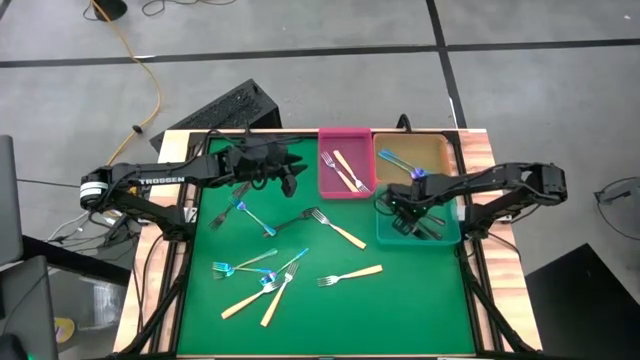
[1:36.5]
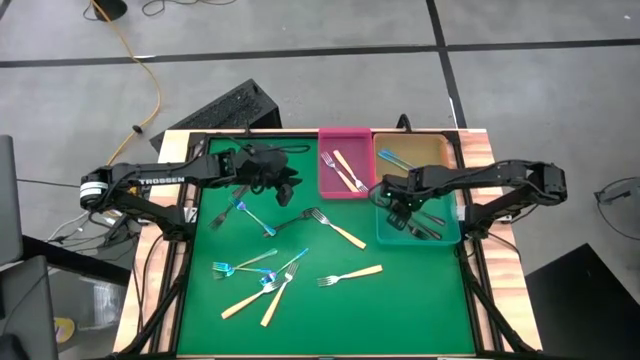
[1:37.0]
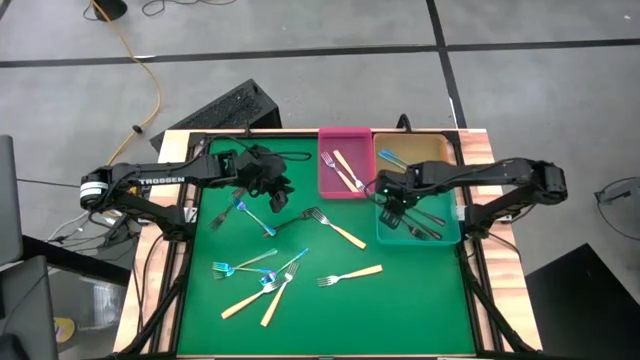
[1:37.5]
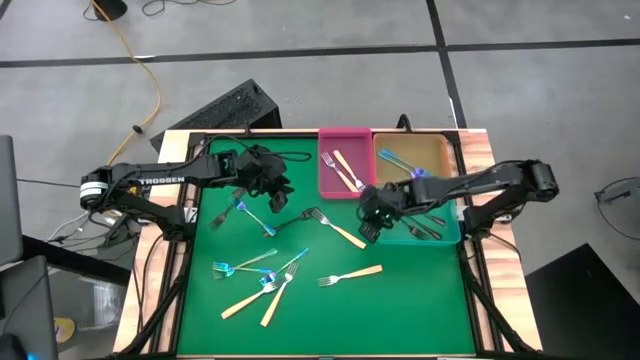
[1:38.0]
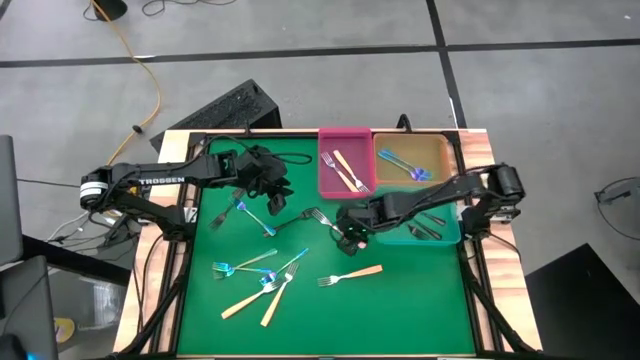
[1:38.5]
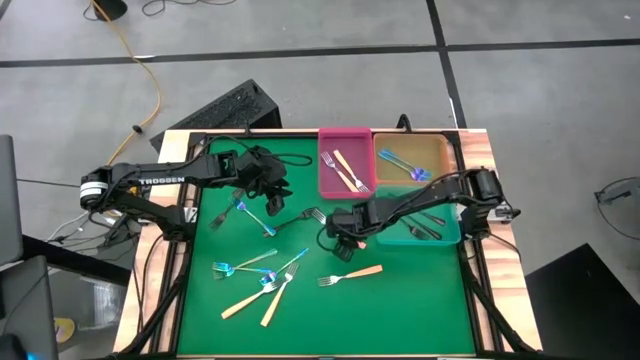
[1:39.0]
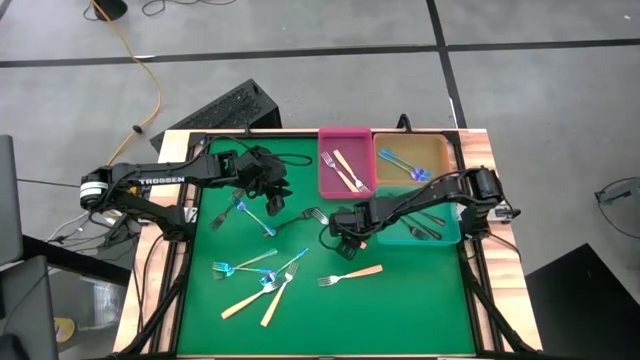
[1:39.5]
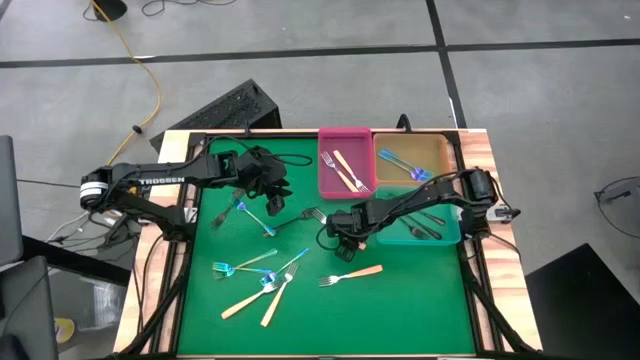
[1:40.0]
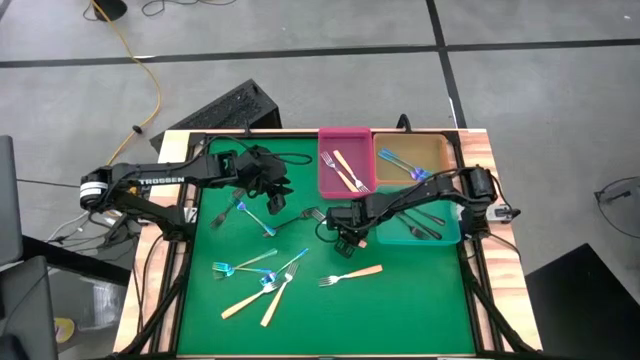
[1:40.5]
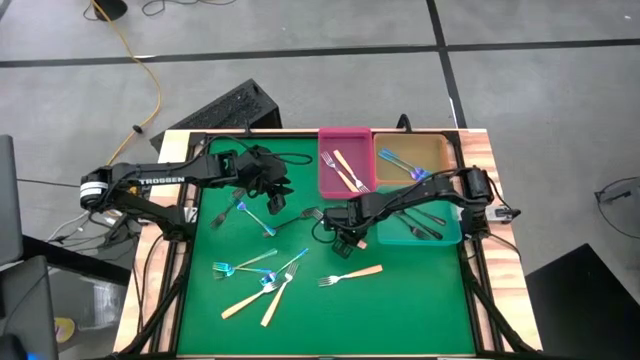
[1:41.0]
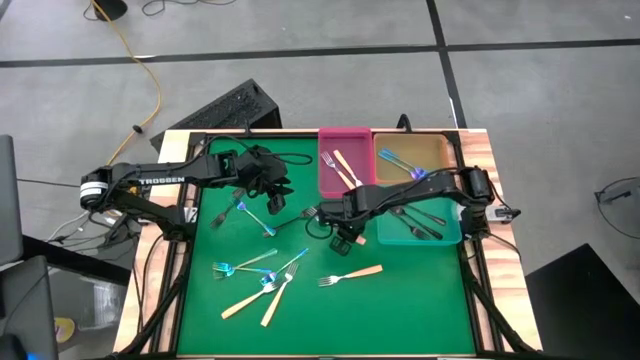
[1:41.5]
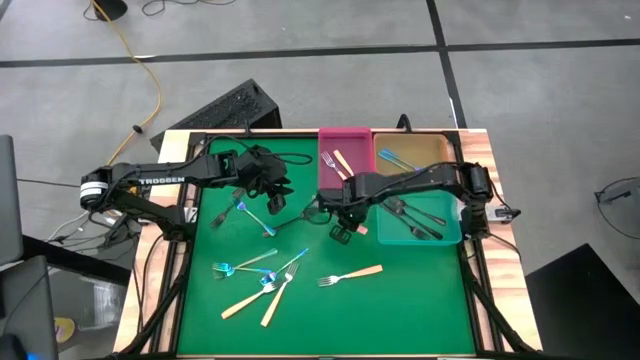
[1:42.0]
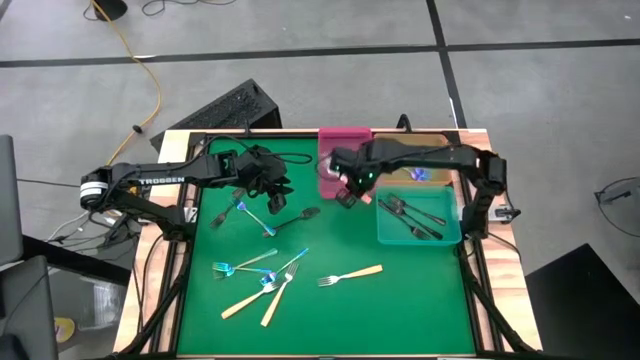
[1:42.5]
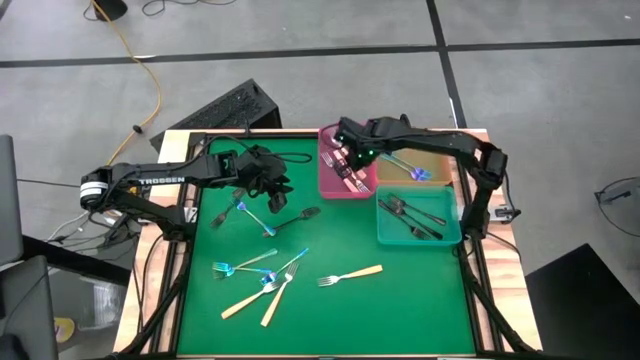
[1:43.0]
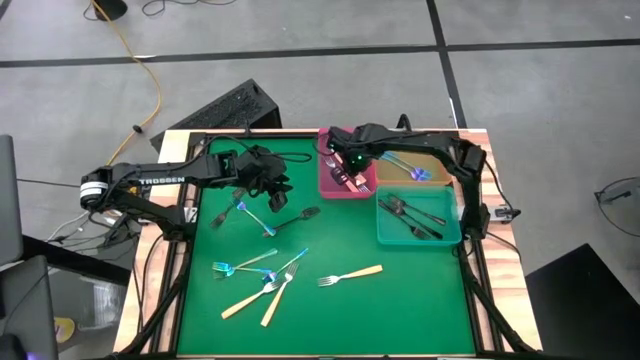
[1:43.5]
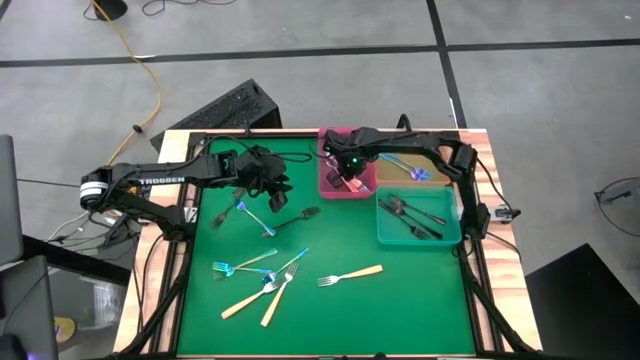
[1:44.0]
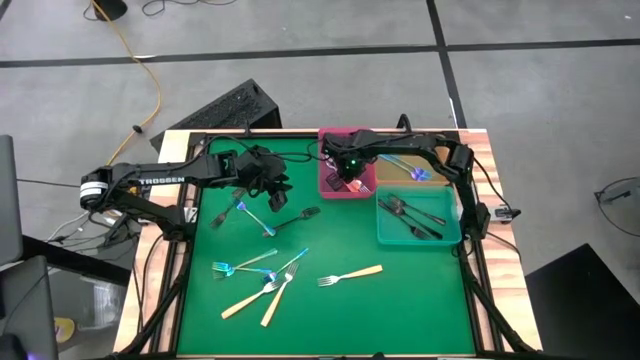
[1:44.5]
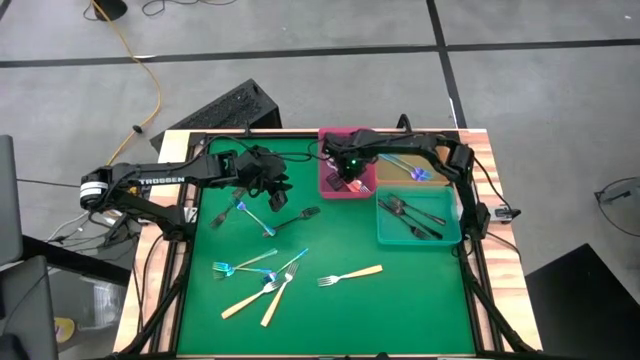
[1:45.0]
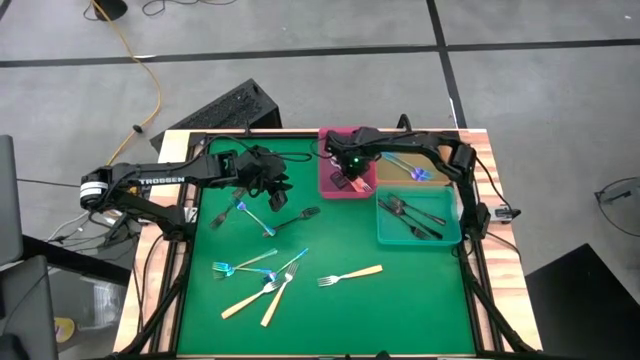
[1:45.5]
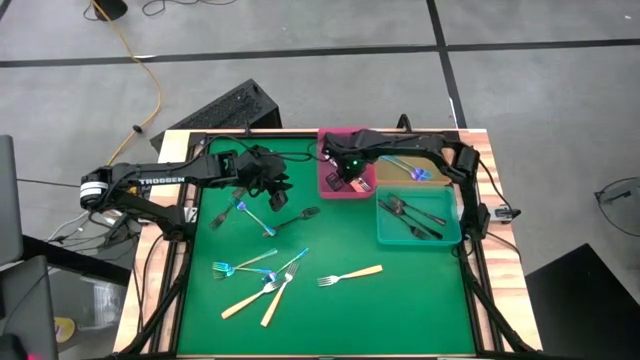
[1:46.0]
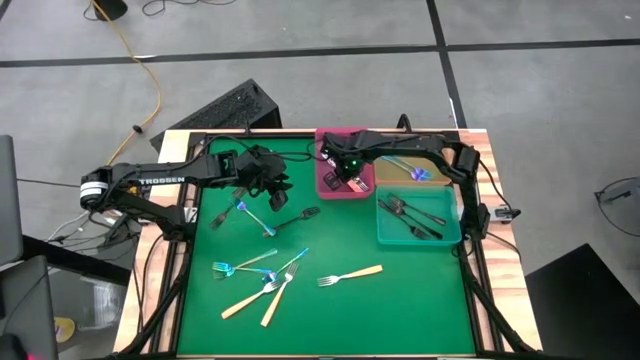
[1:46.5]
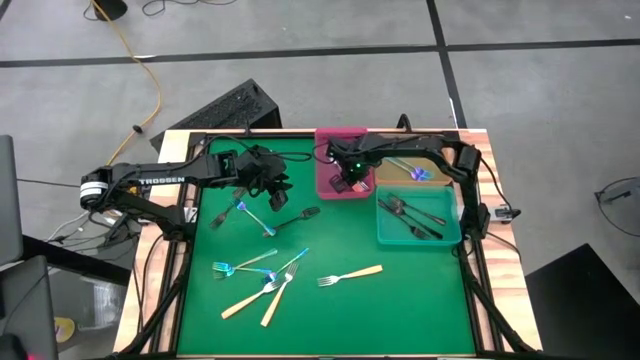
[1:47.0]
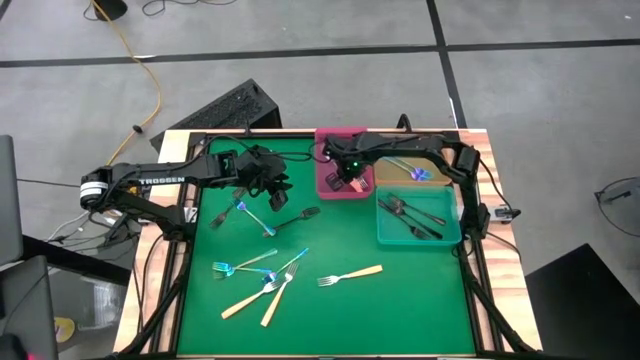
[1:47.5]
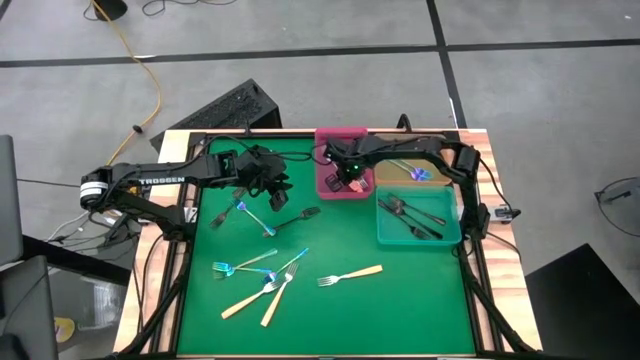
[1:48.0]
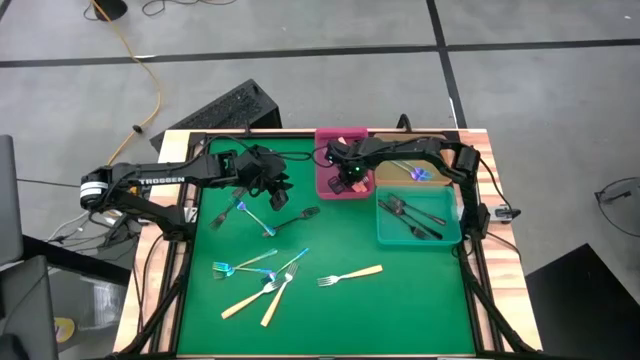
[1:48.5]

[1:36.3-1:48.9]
Task: Sort silverware by color (type)
Put the yellow fork into the pink bin

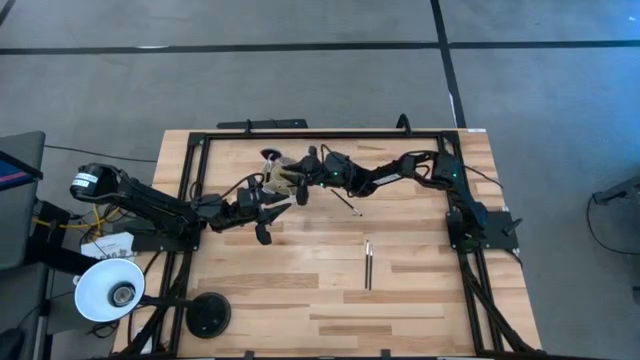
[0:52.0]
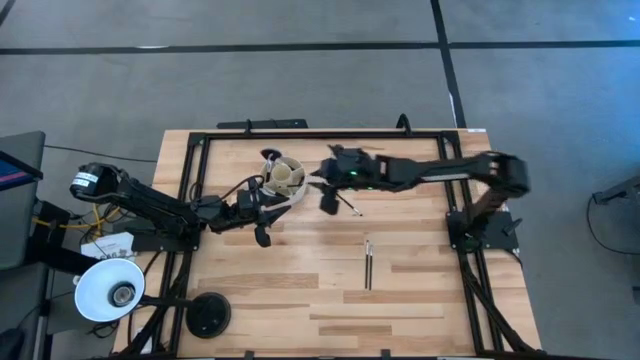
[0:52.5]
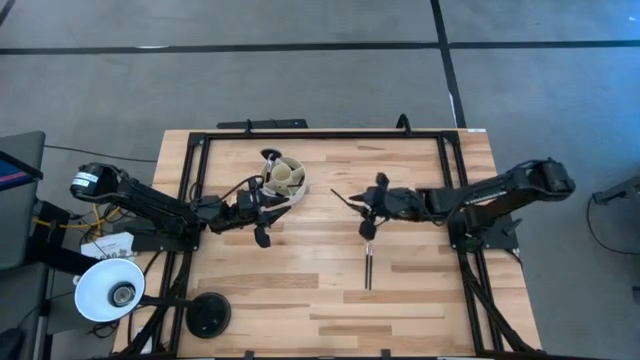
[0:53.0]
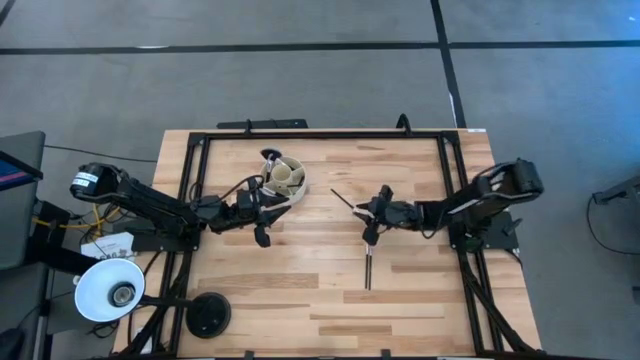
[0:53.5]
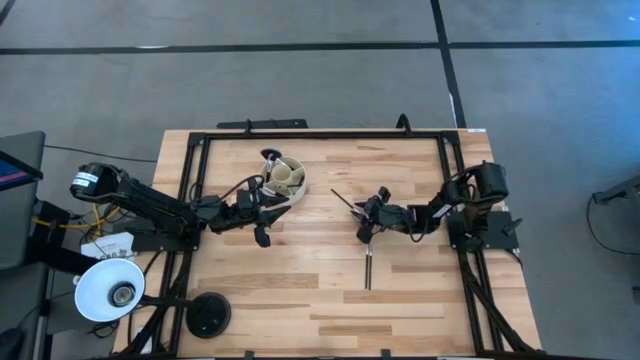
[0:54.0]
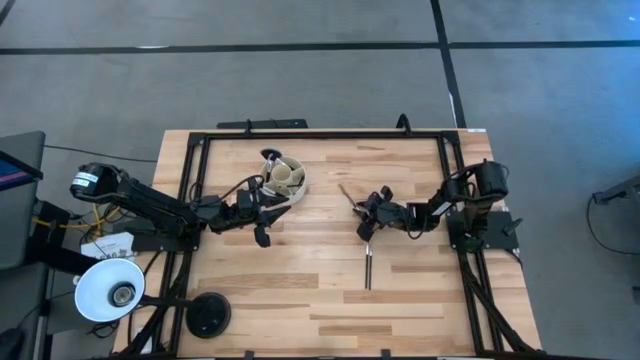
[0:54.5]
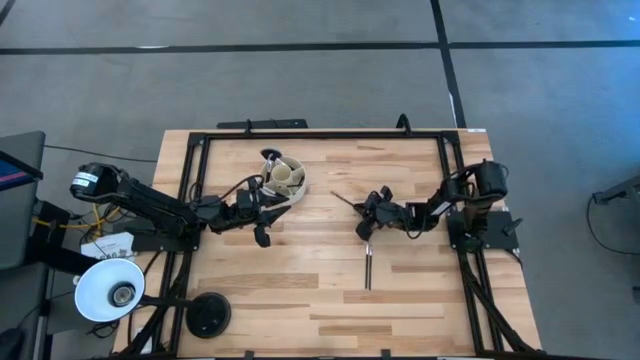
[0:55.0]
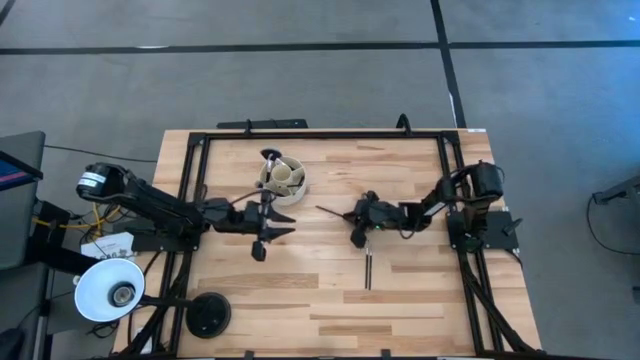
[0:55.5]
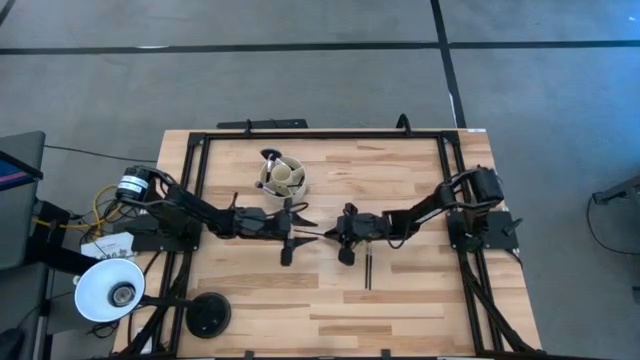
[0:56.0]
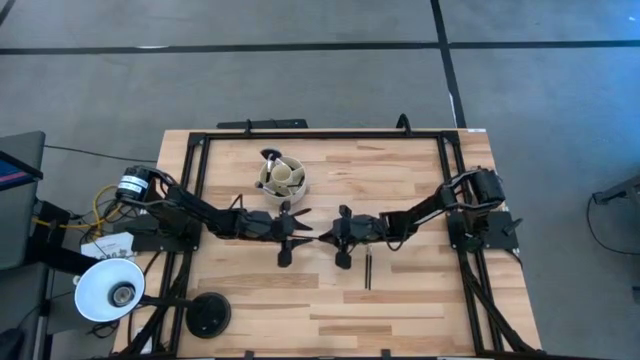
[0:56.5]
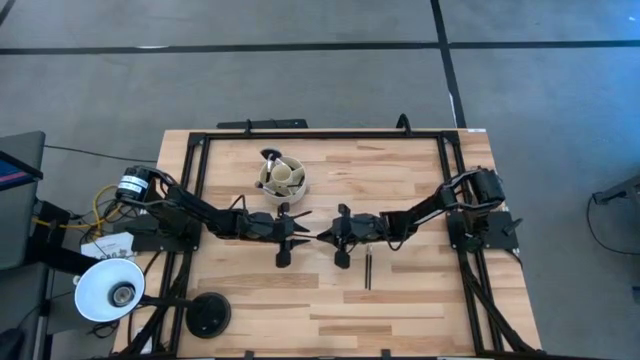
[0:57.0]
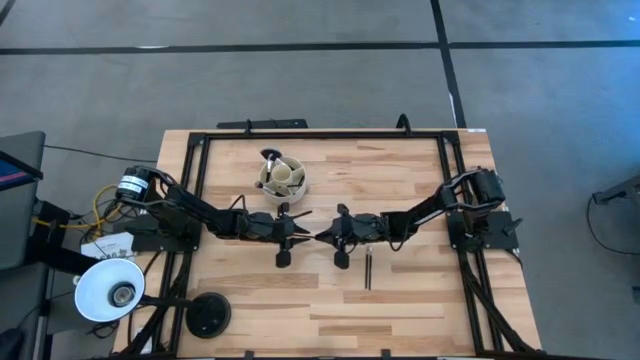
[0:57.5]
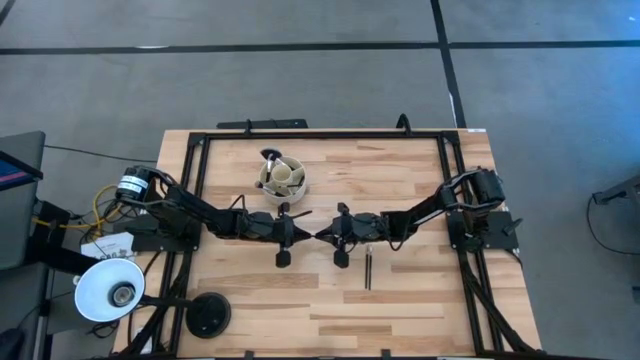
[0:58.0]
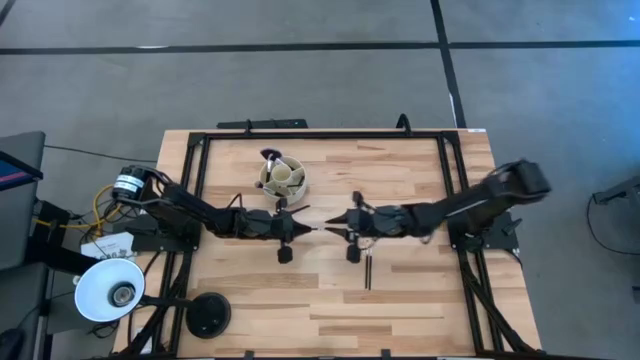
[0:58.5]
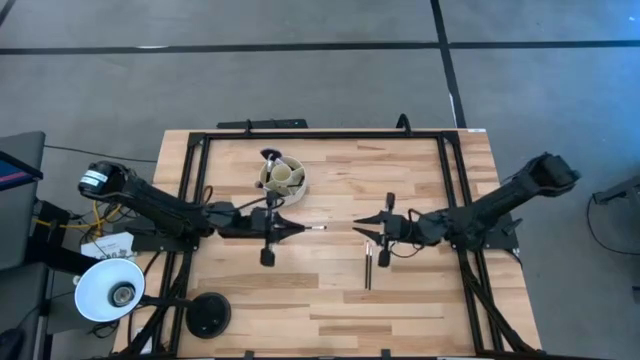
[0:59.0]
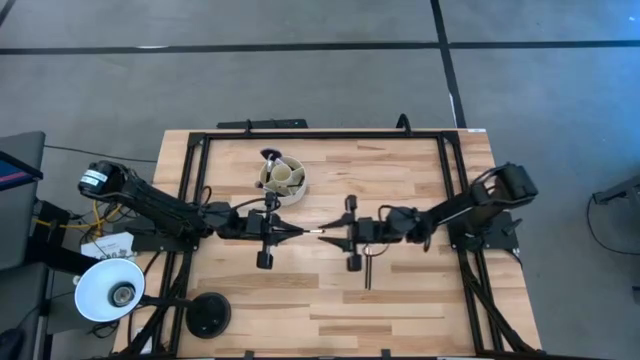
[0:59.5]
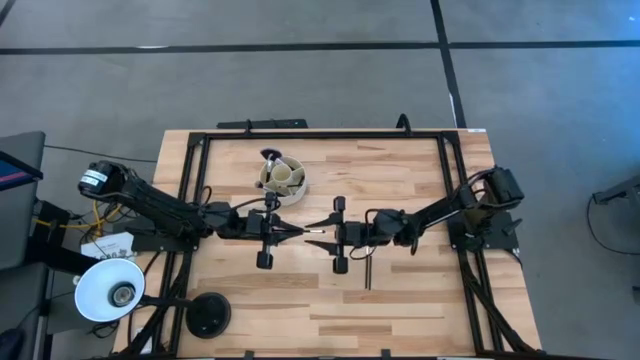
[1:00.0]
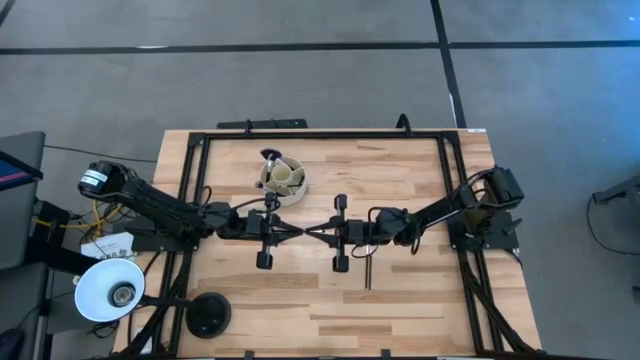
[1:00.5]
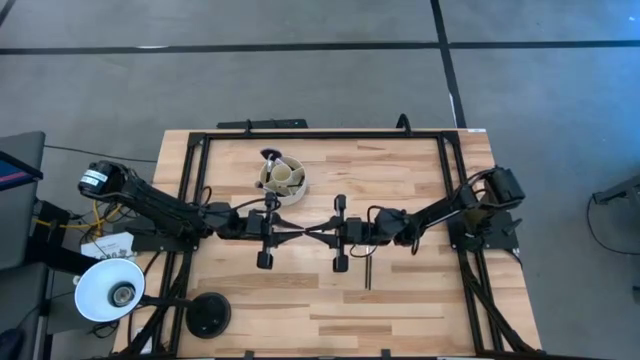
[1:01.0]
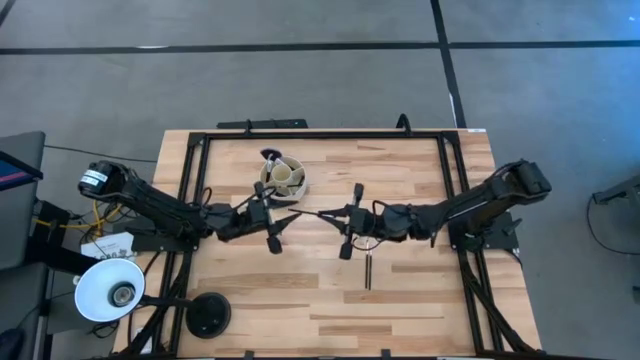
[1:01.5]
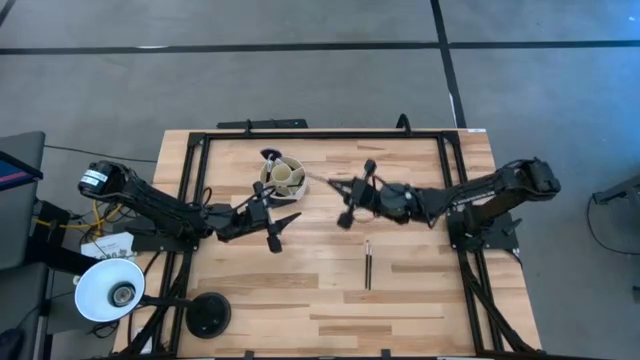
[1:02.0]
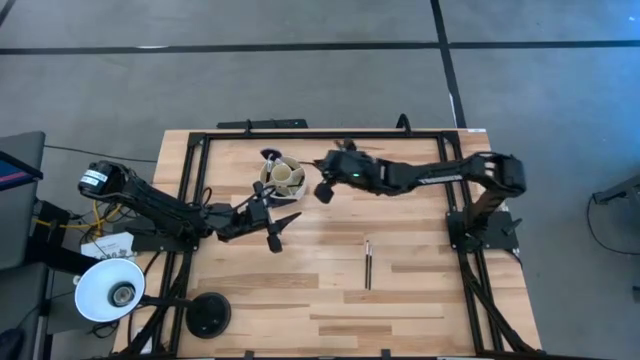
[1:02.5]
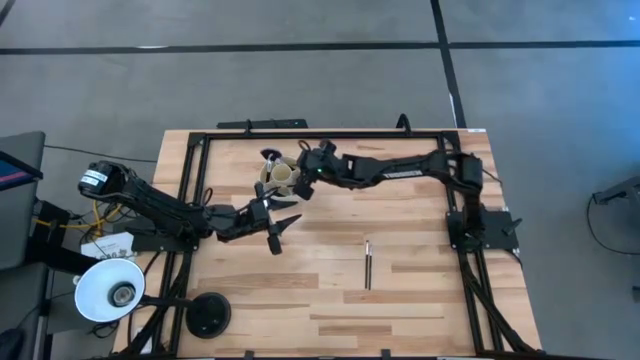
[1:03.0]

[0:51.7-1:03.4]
Task: Sort items
Put the black eyeshadow brush in the white organizer
